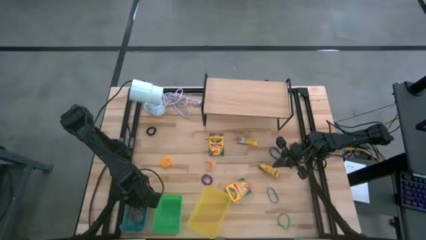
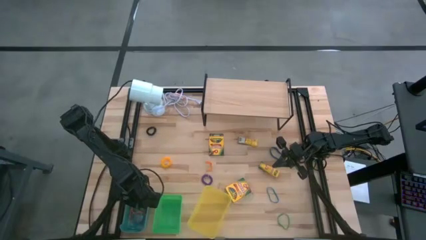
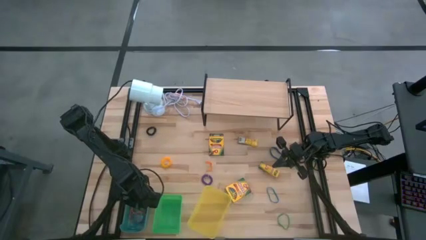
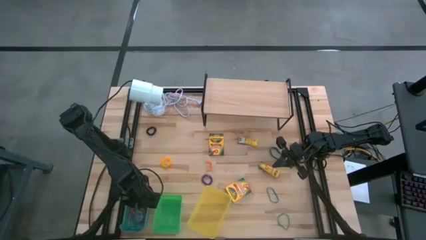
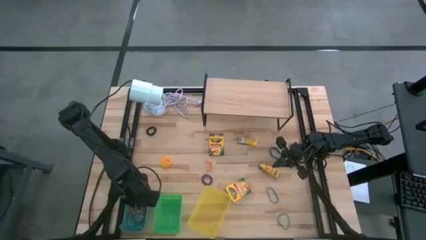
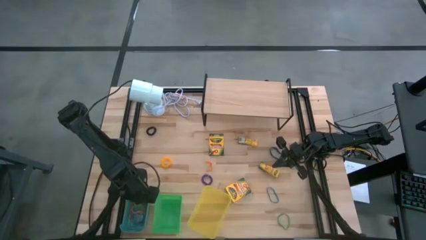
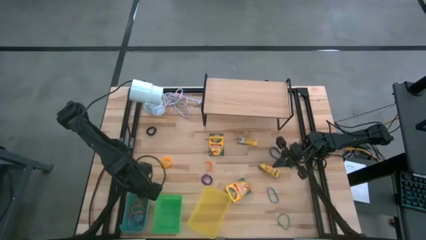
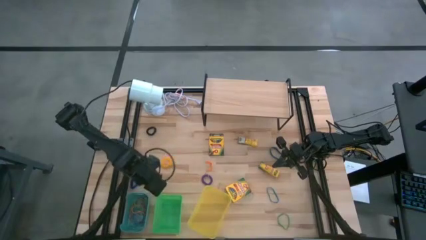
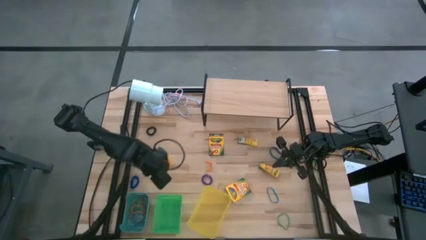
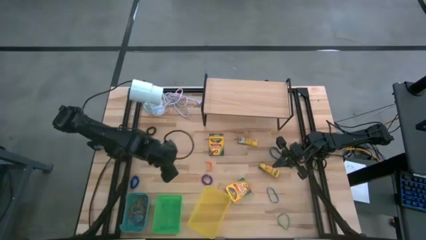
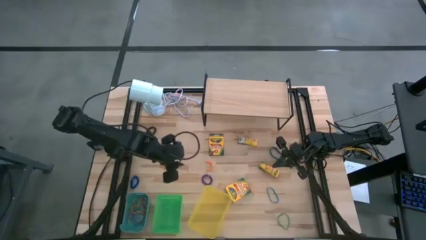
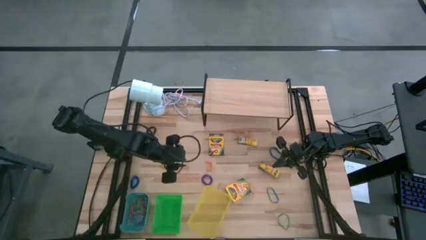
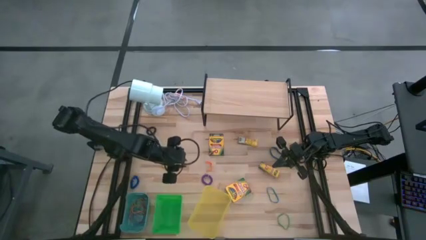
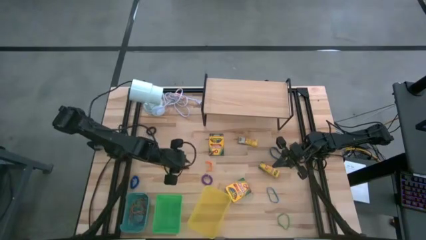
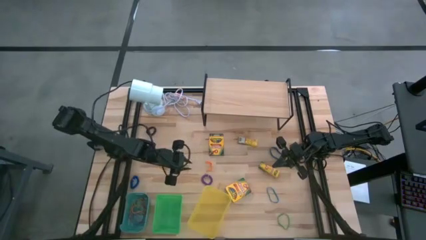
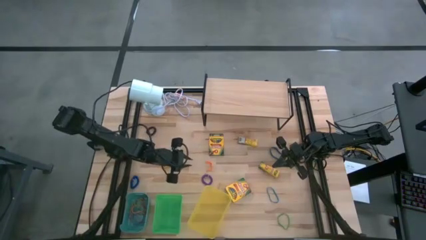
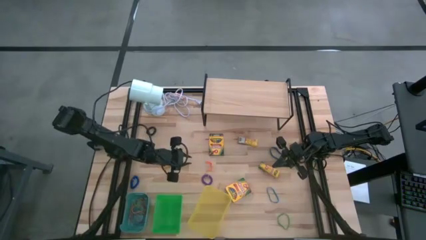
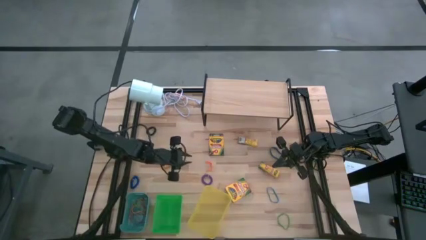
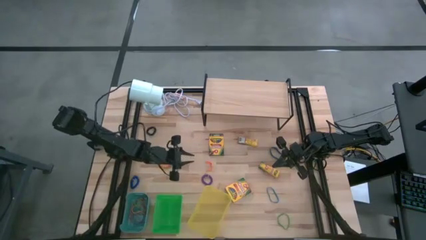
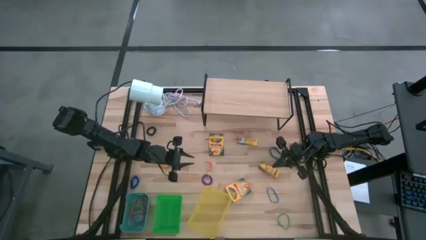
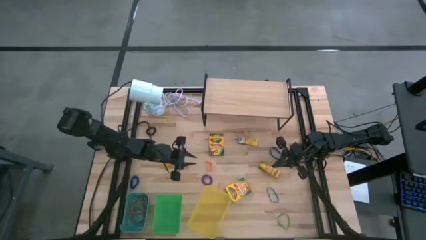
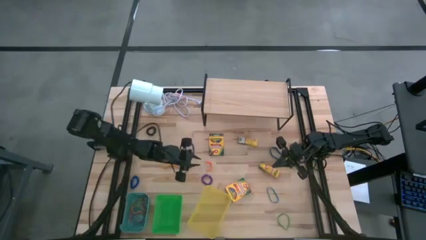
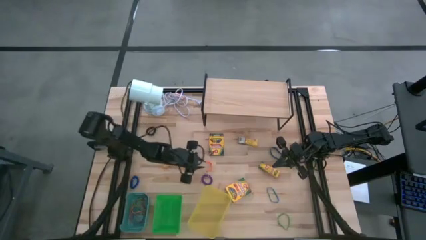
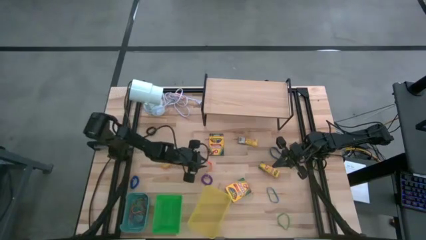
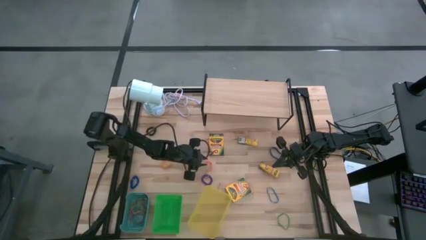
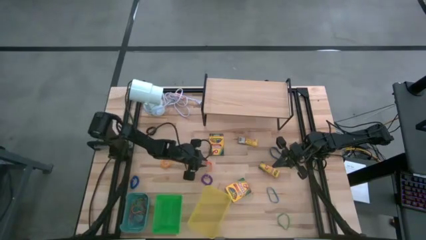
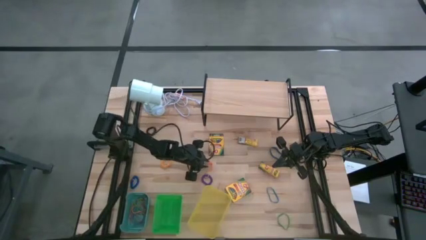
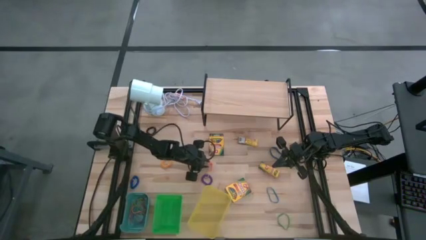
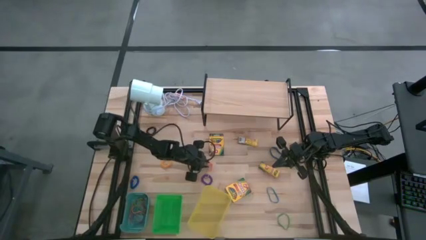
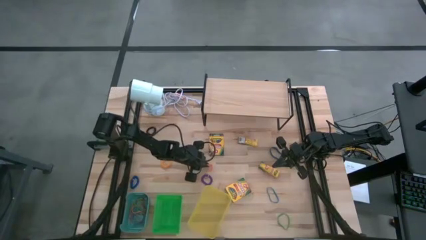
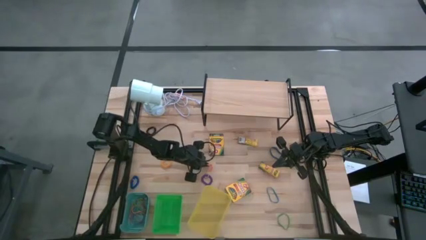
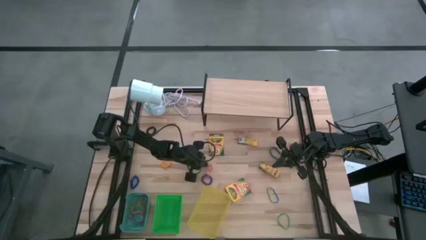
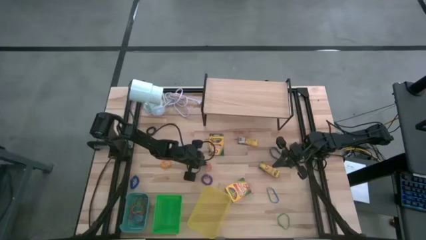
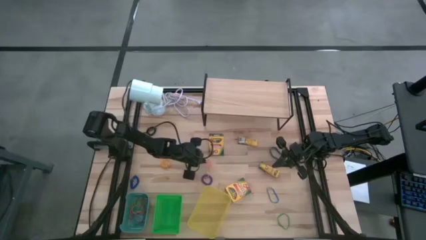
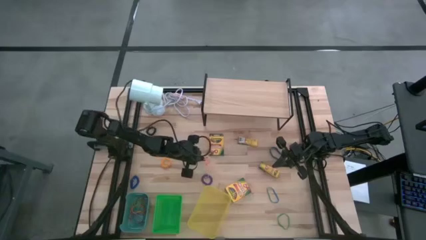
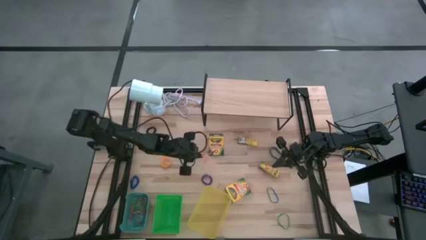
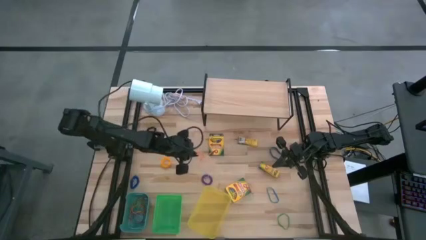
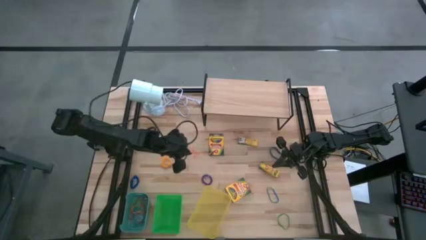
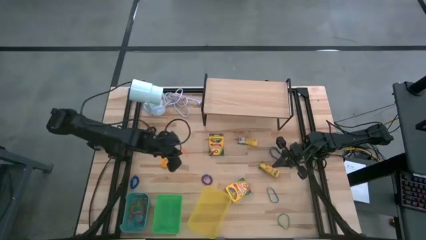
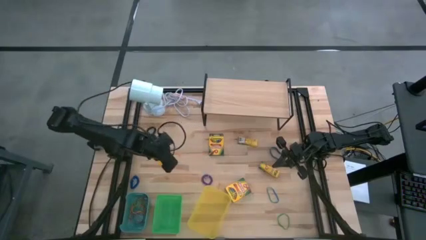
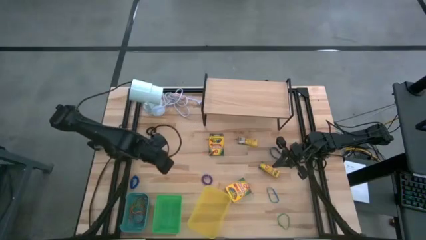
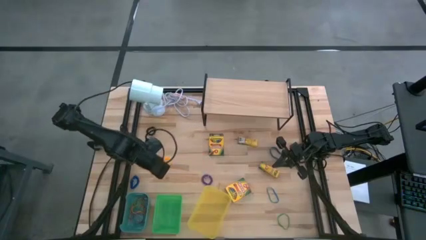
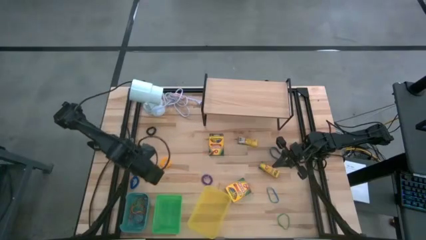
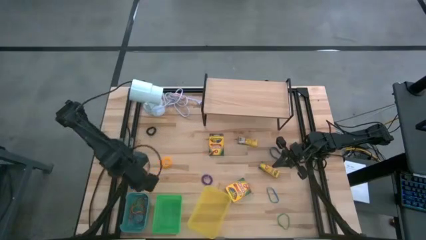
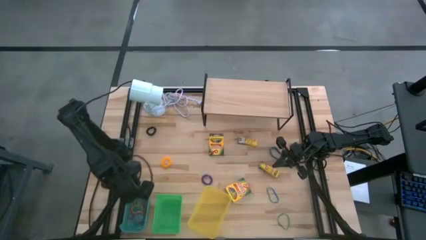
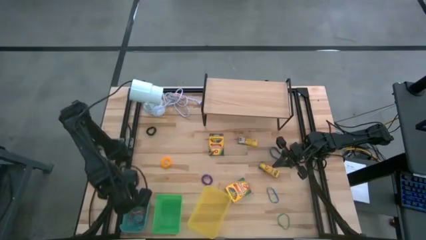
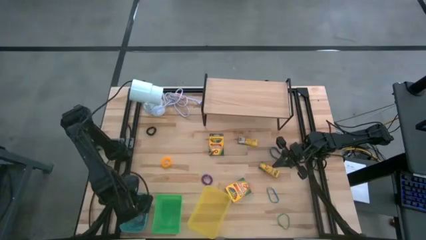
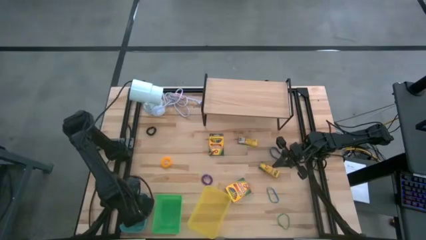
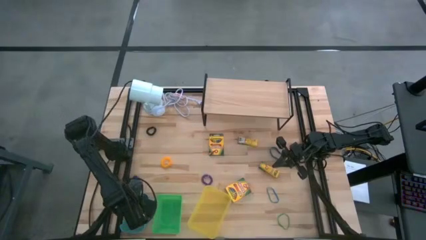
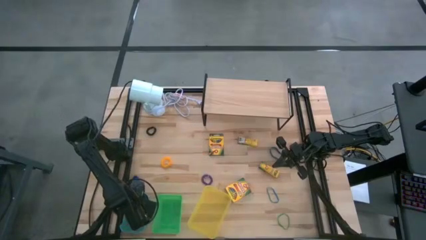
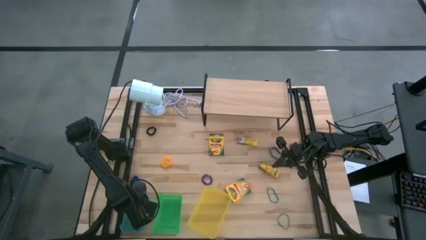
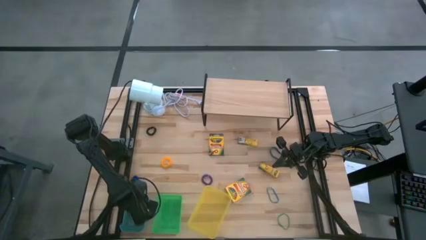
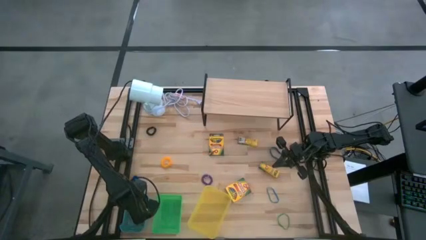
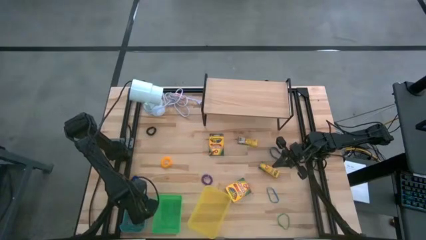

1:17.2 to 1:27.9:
Task: Pick & Place Office Desk Supplies
Put the orange rubberband into the blue bin
